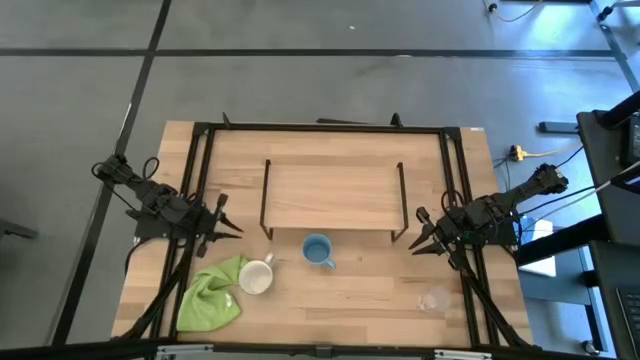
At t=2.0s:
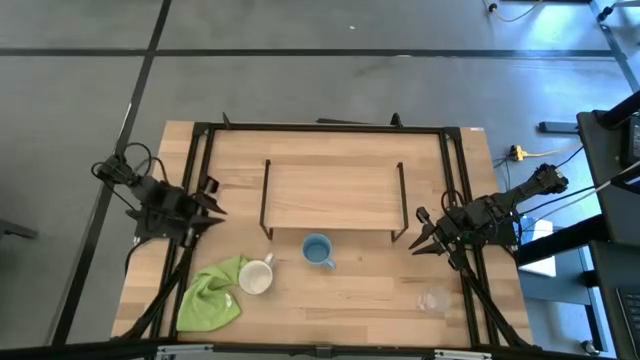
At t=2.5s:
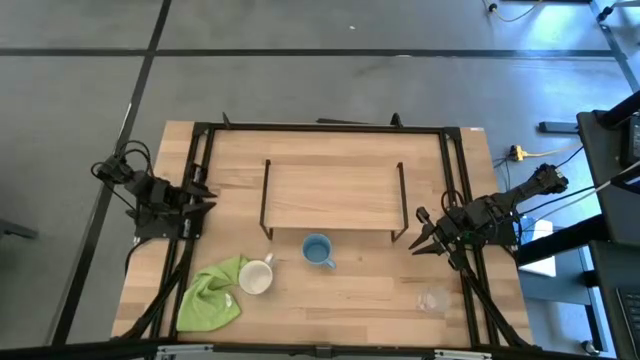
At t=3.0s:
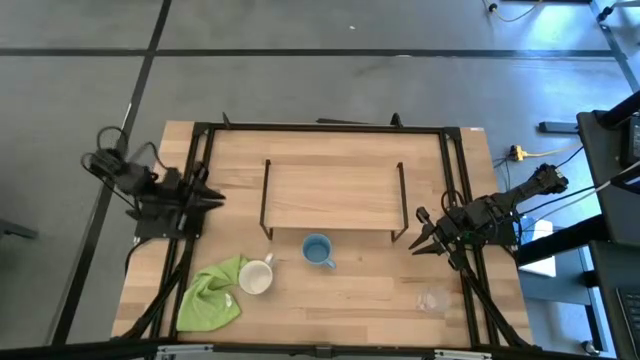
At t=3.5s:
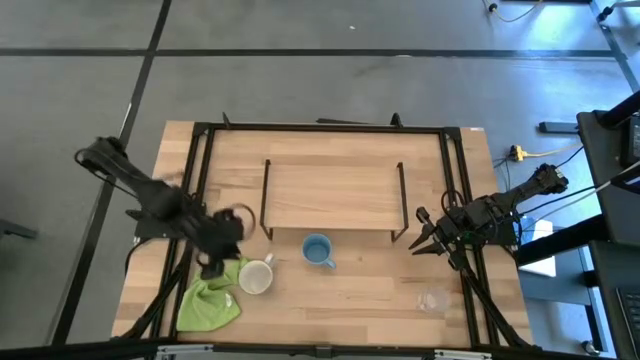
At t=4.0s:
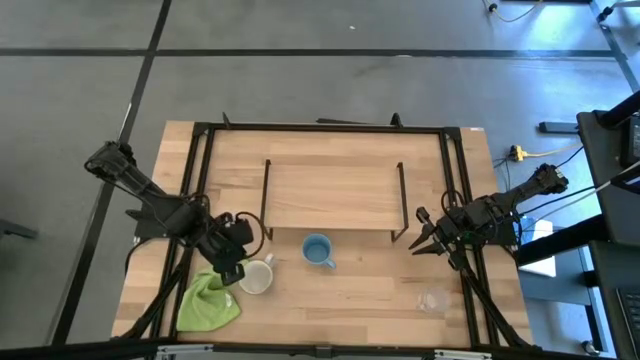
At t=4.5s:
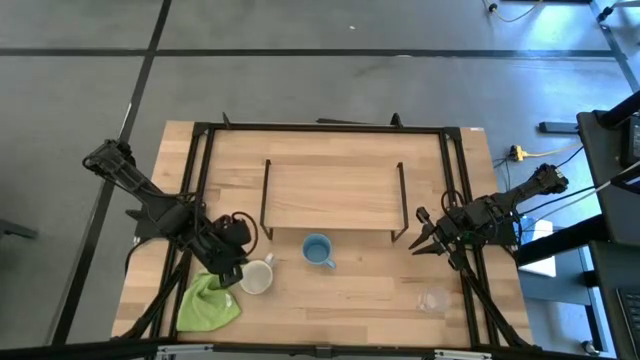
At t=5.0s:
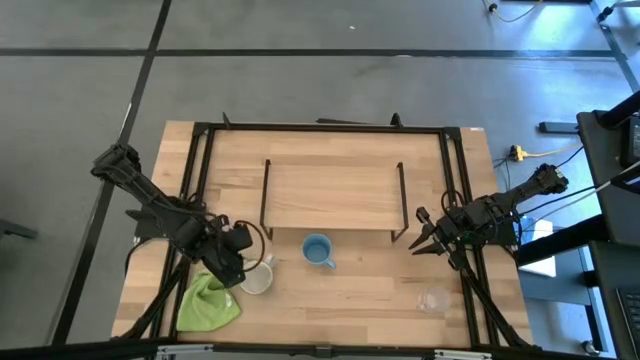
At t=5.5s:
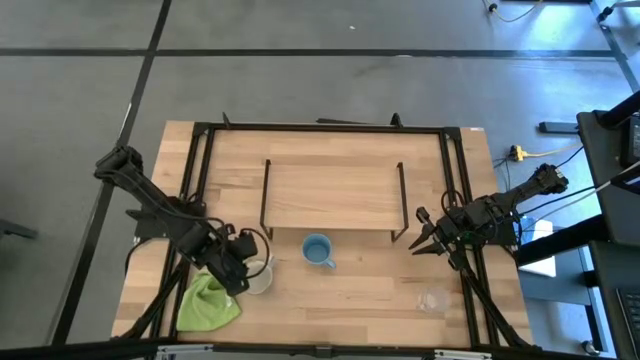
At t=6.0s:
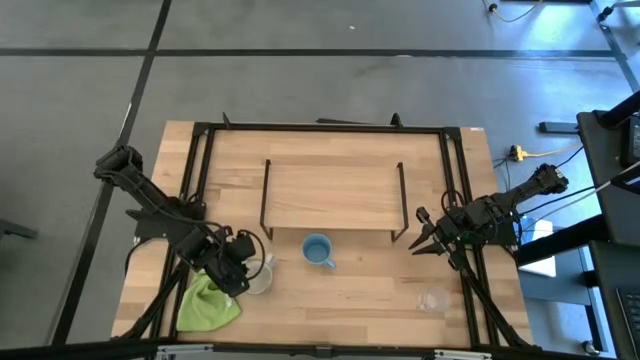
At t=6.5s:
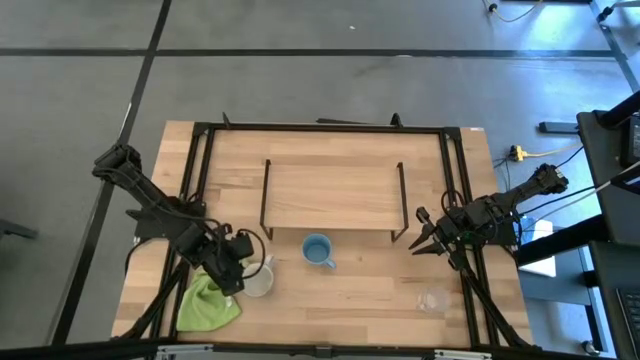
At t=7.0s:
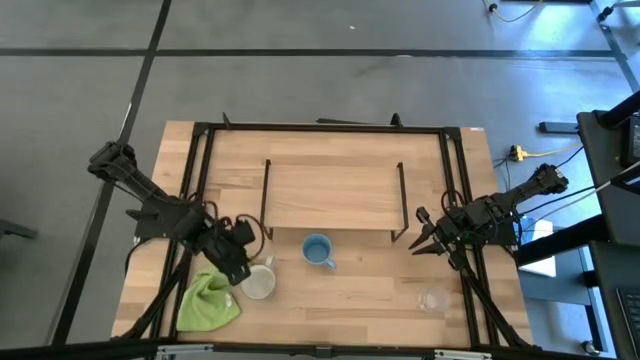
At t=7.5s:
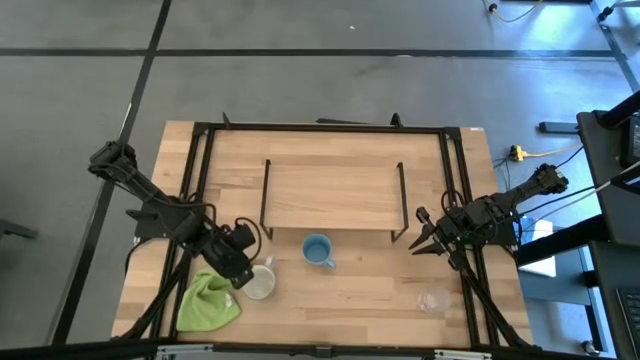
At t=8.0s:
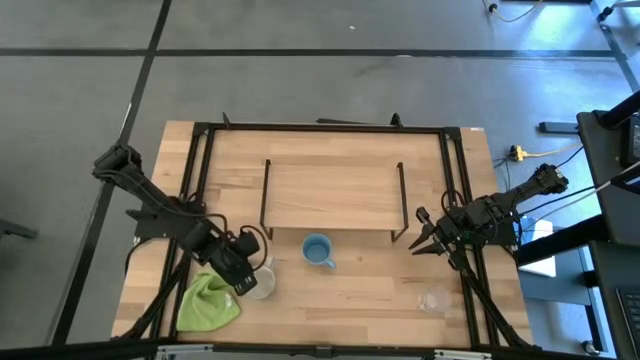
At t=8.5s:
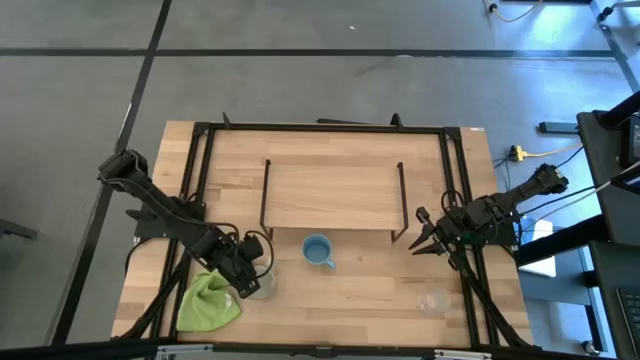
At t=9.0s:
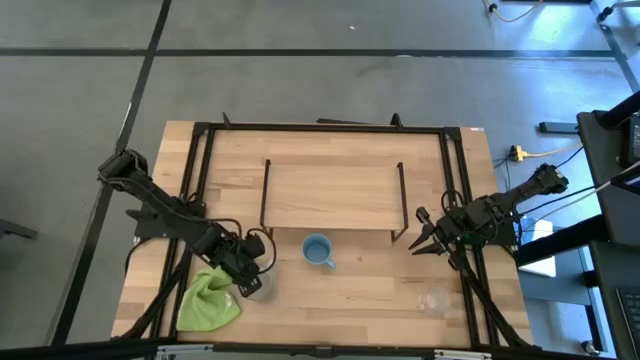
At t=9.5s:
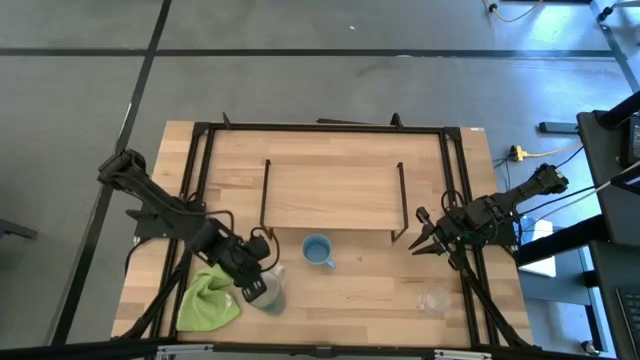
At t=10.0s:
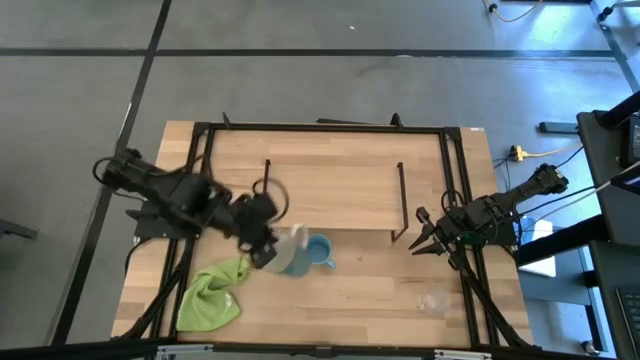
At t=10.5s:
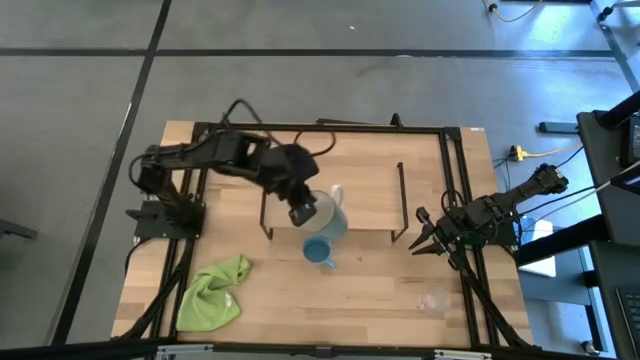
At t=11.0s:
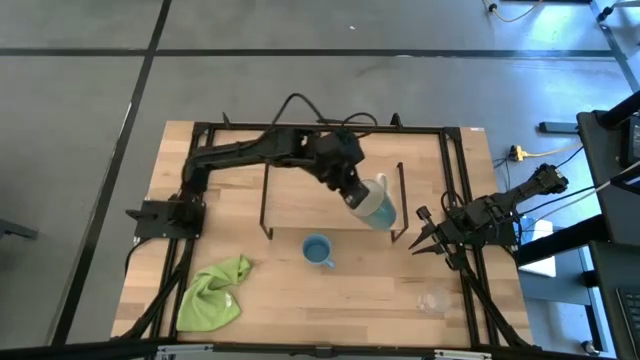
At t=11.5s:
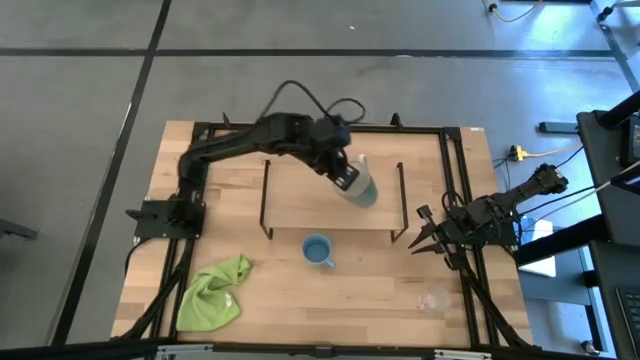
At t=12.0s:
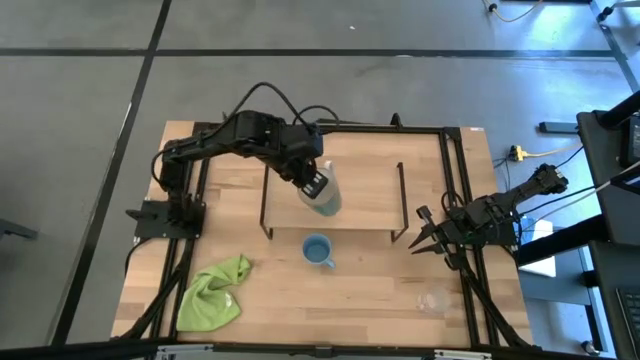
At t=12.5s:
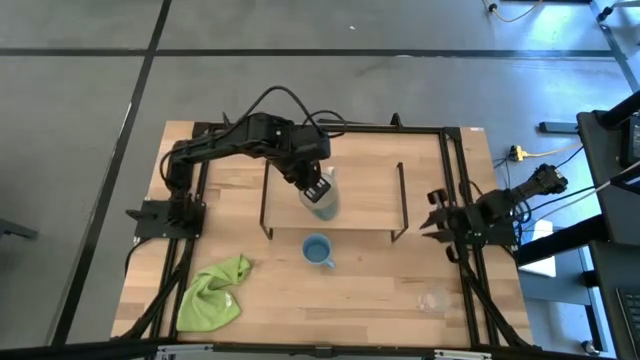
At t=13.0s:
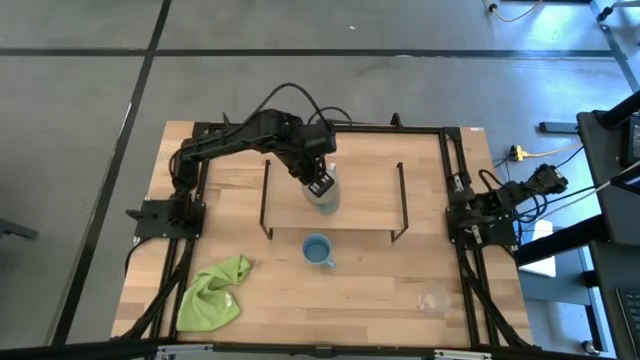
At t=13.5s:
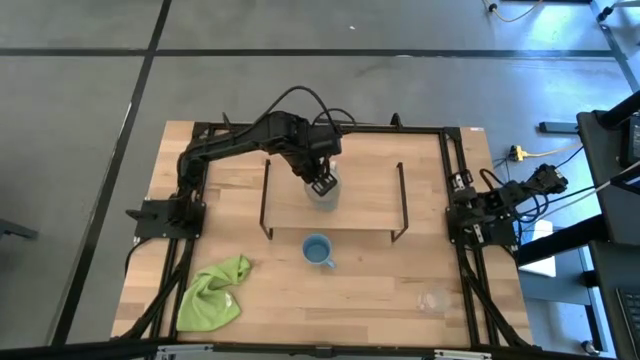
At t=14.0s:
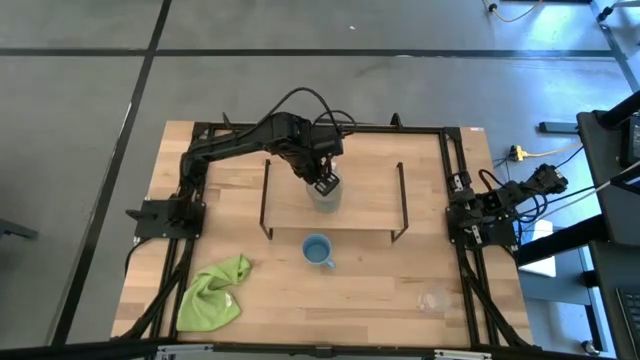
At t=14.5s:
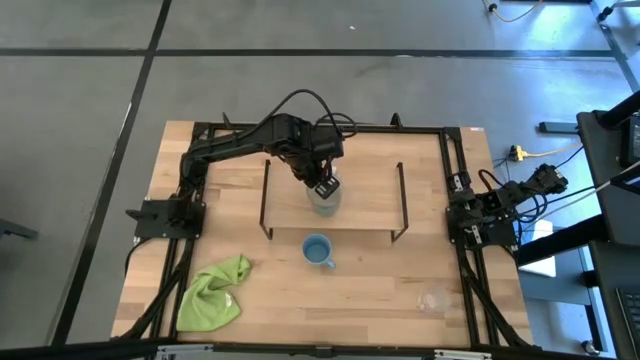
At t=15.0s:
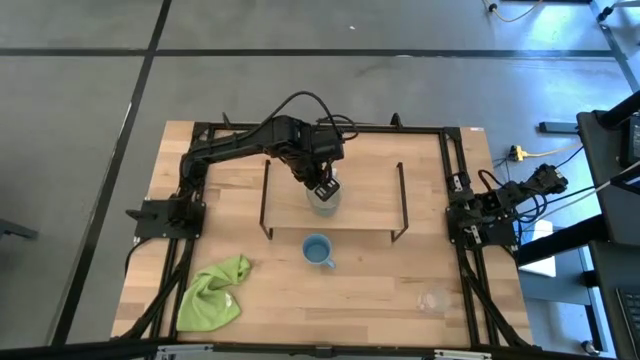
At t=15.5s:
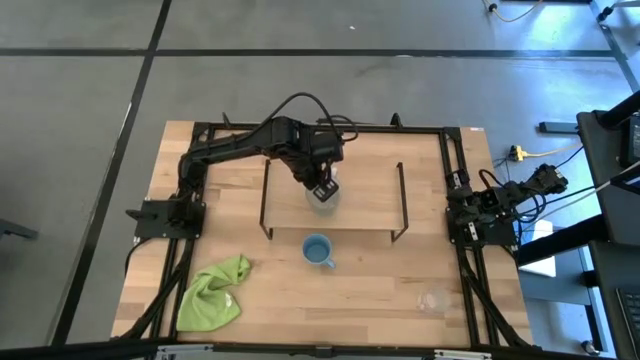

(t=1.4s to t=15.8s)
Task: Stack small to large cups/mugs on shelf
Put the light blue mug on the shelf

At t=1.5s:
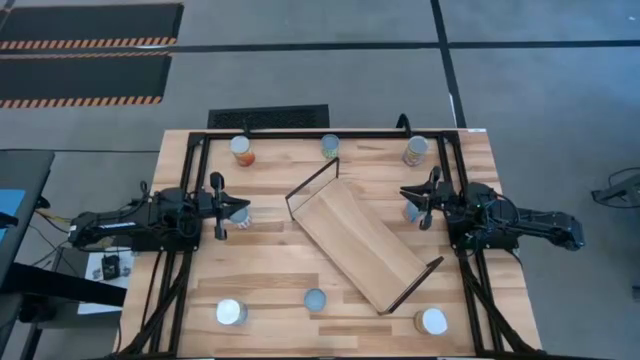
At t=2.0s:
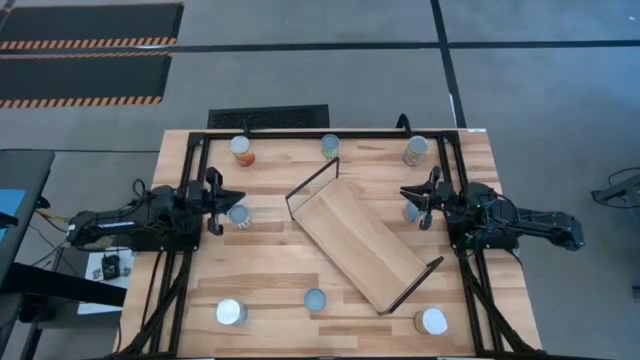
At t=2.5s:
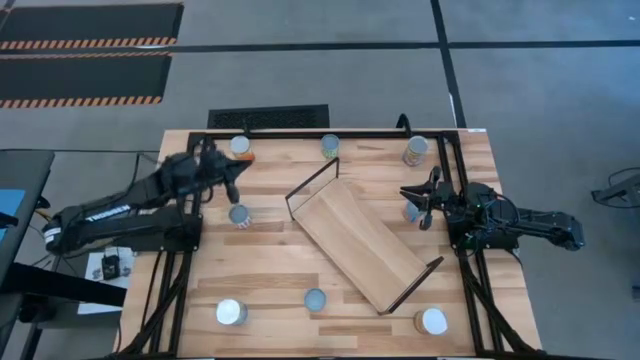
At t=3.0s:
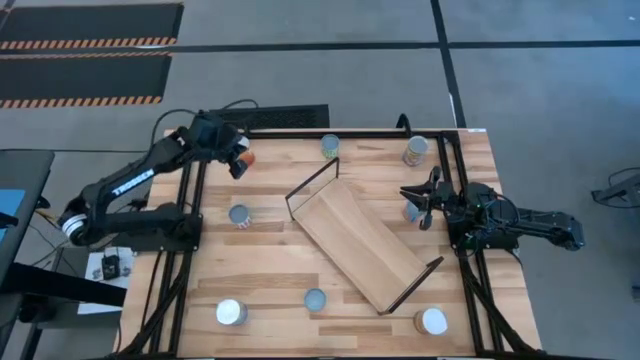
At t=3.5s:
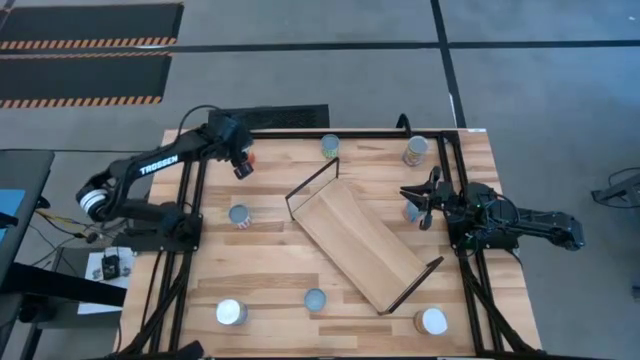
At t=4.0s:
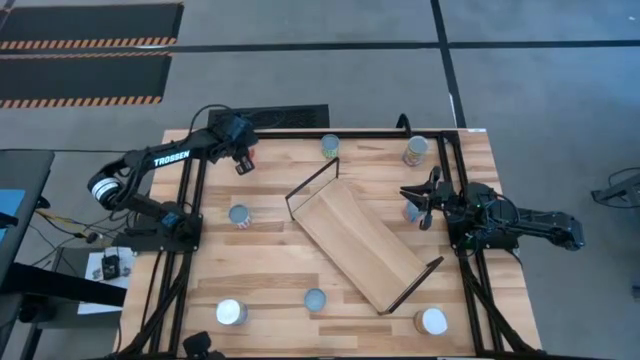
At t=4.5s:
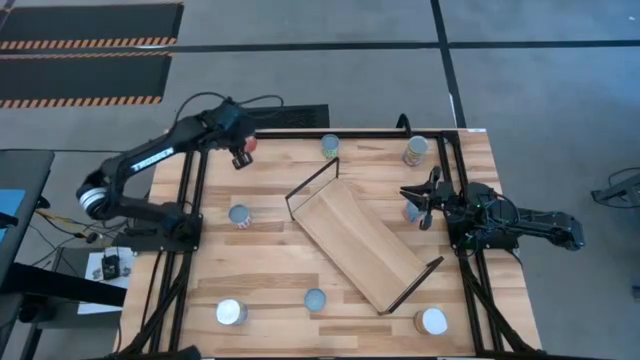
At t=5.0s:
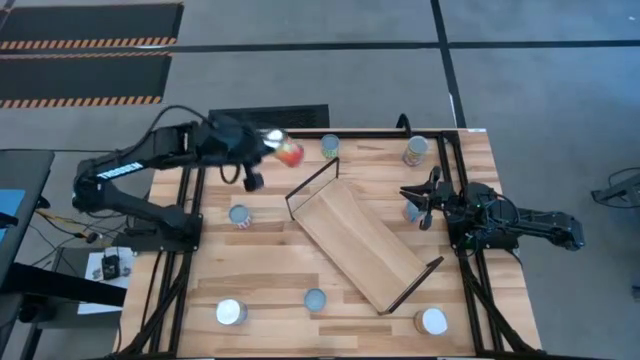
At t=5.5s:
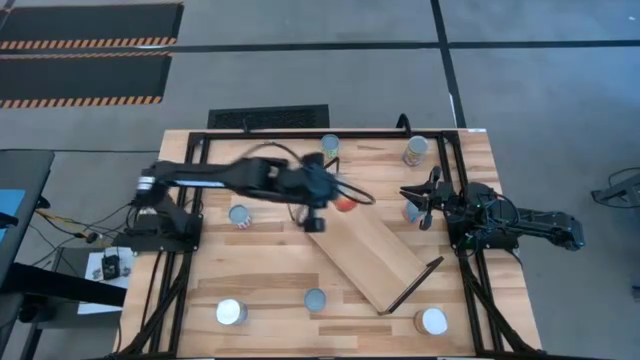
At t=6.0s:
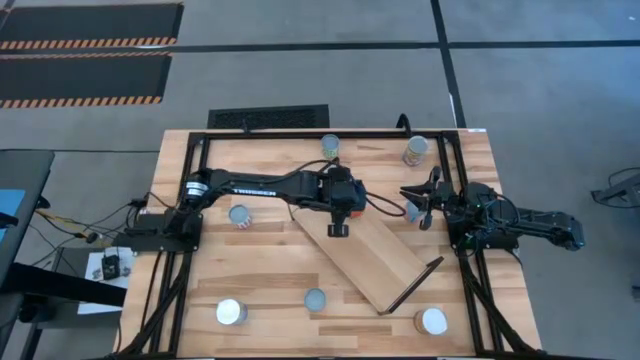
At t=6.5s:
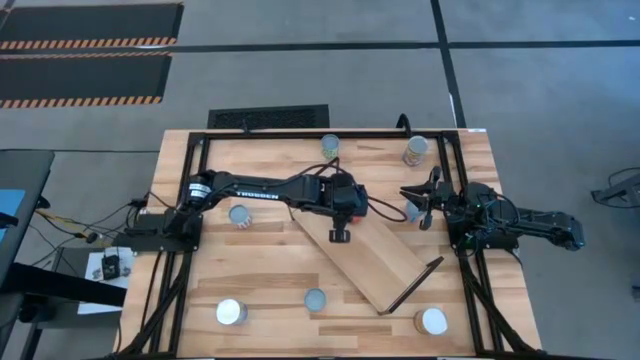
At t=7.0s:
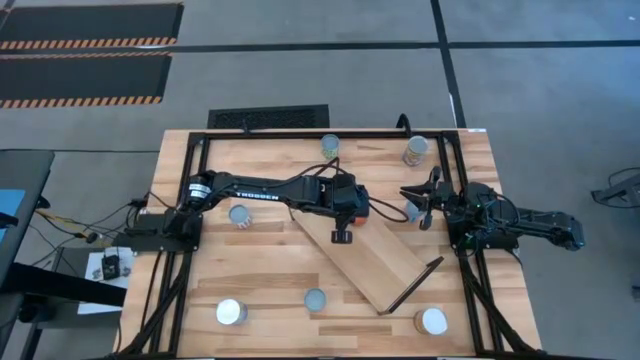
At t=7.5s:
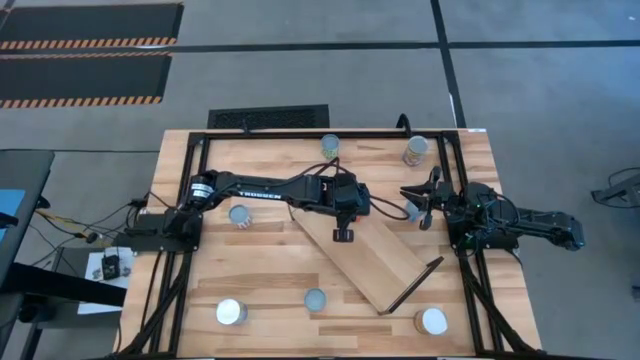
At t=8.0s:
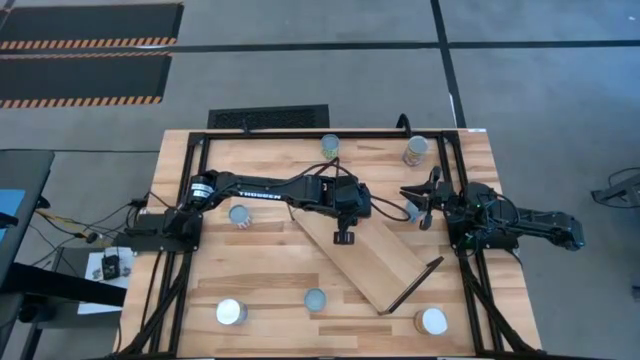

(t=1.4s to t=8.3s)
Task: Pick and place cans onto a shelf
Put the top large canned corn on the shelf
